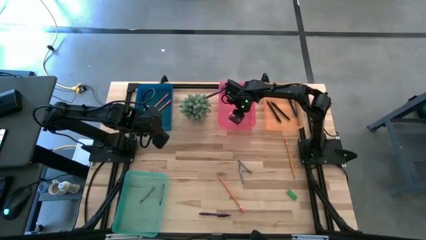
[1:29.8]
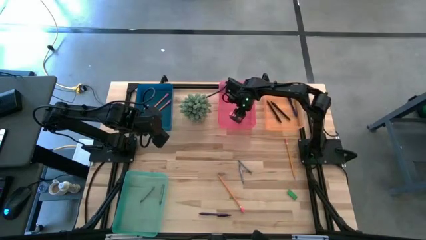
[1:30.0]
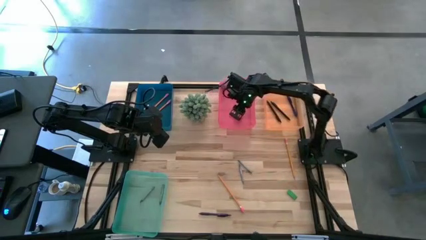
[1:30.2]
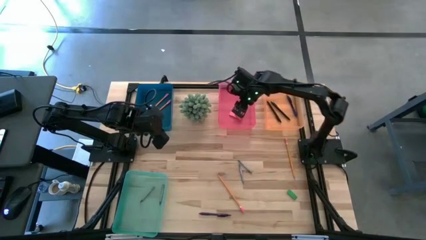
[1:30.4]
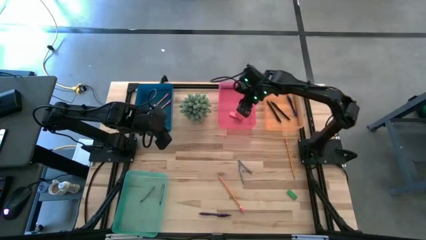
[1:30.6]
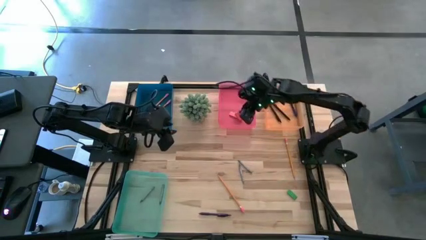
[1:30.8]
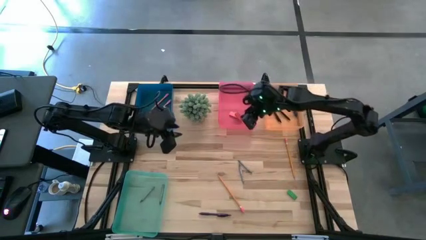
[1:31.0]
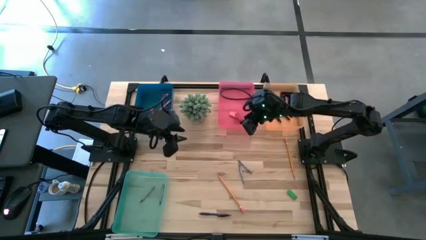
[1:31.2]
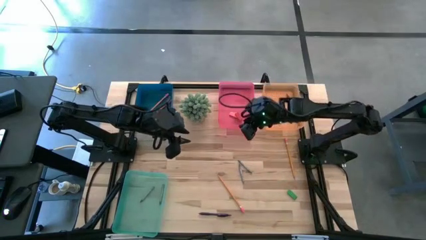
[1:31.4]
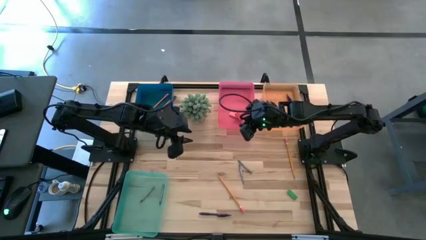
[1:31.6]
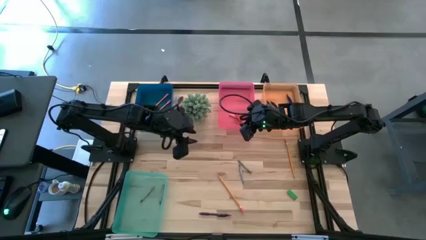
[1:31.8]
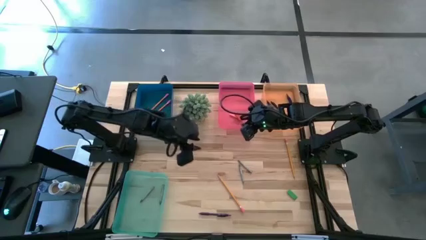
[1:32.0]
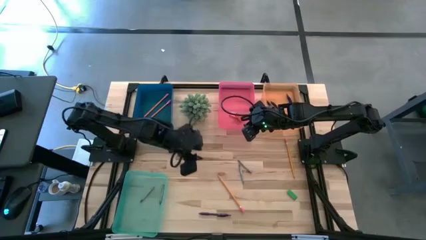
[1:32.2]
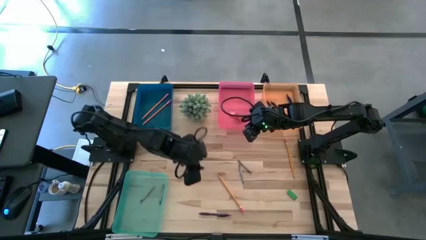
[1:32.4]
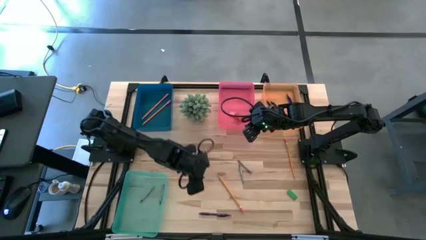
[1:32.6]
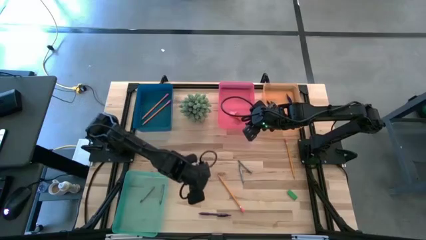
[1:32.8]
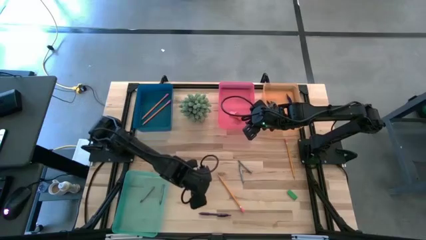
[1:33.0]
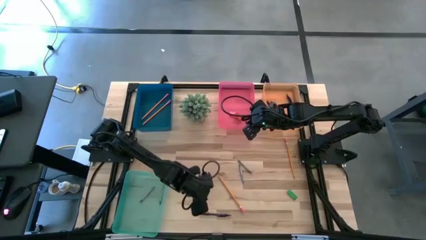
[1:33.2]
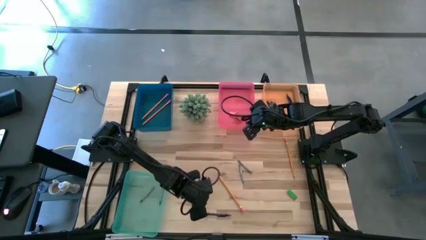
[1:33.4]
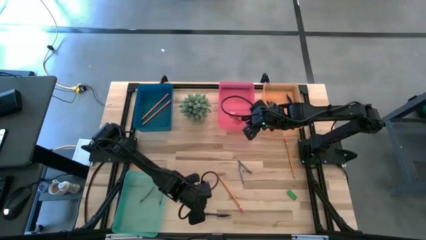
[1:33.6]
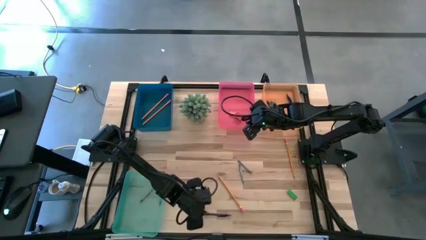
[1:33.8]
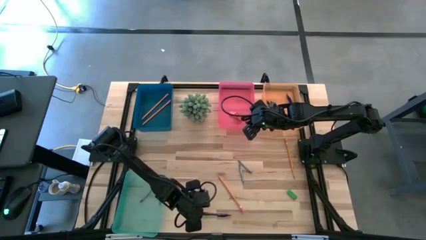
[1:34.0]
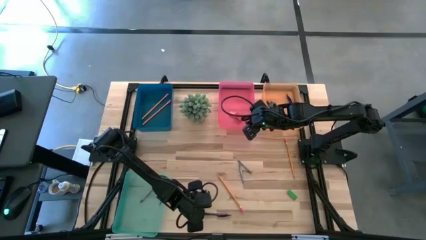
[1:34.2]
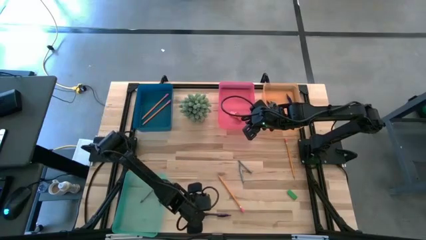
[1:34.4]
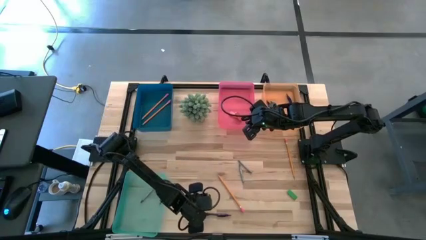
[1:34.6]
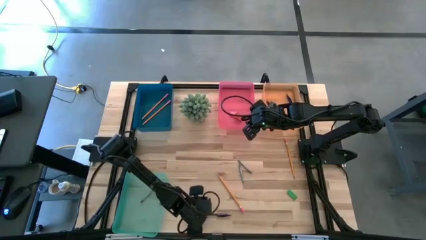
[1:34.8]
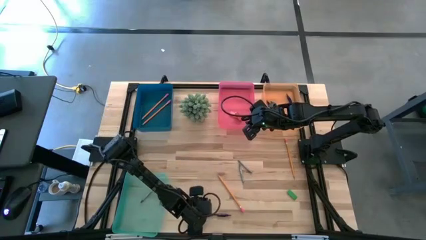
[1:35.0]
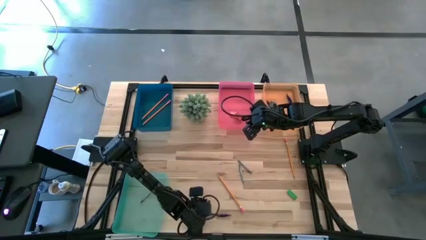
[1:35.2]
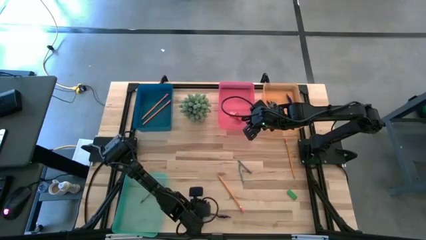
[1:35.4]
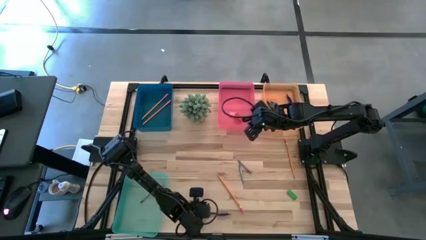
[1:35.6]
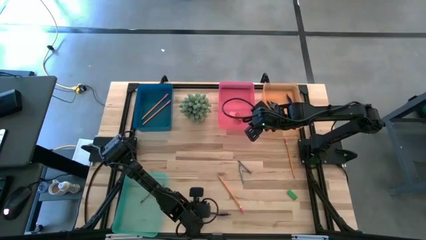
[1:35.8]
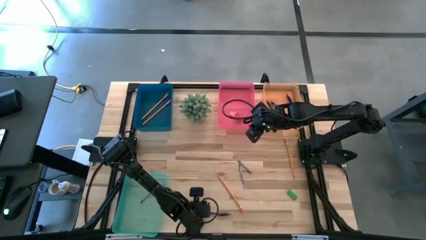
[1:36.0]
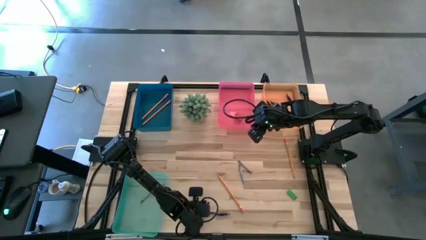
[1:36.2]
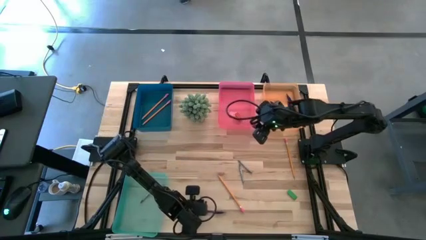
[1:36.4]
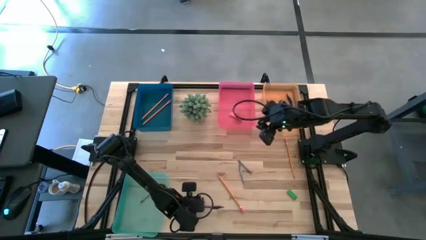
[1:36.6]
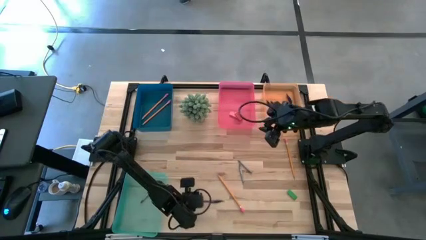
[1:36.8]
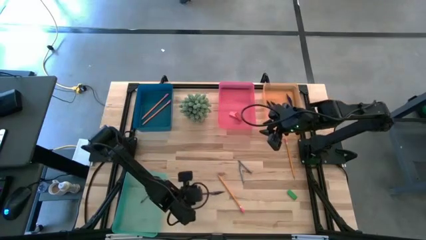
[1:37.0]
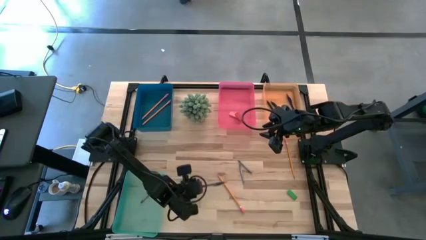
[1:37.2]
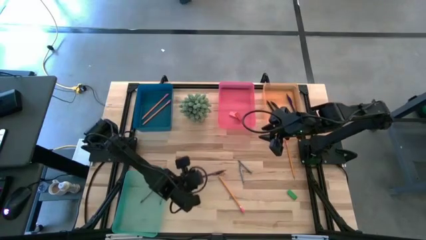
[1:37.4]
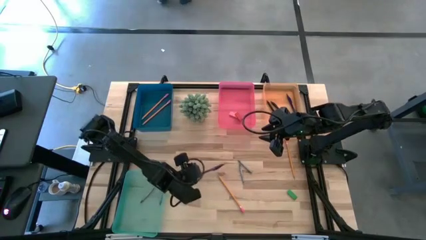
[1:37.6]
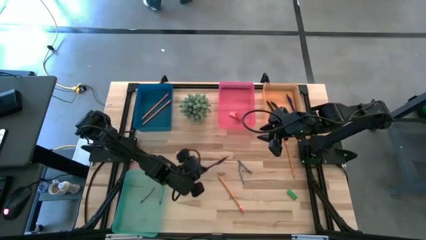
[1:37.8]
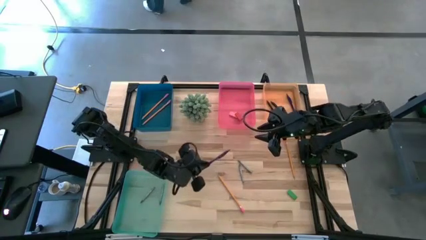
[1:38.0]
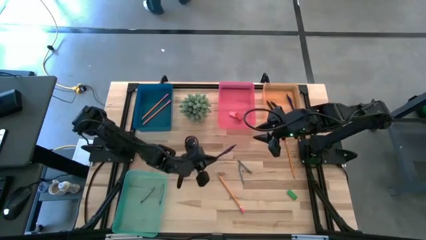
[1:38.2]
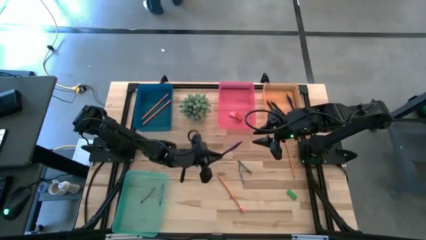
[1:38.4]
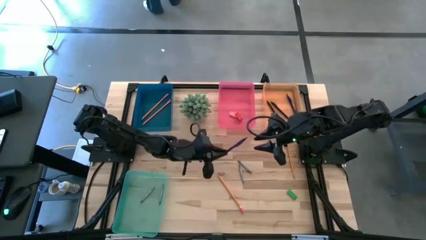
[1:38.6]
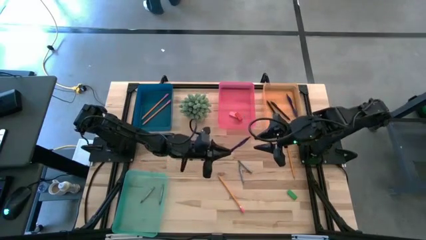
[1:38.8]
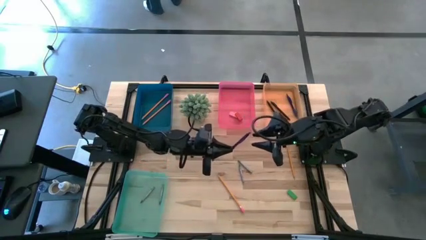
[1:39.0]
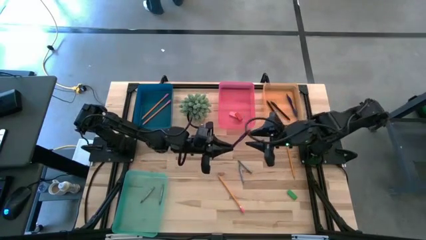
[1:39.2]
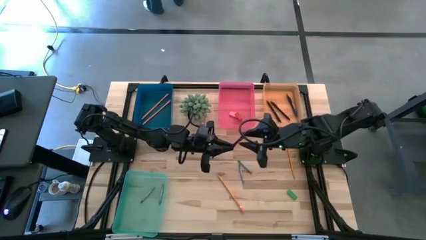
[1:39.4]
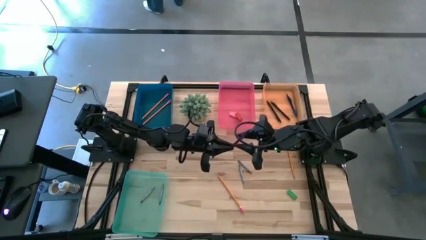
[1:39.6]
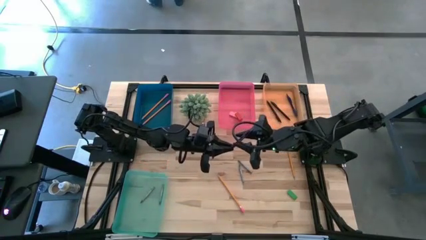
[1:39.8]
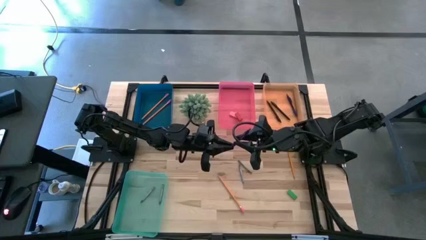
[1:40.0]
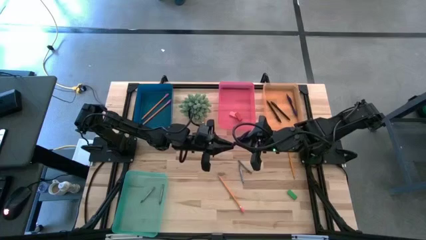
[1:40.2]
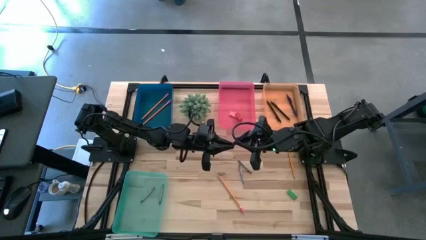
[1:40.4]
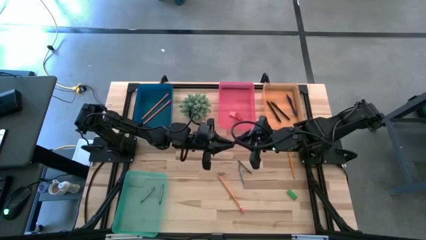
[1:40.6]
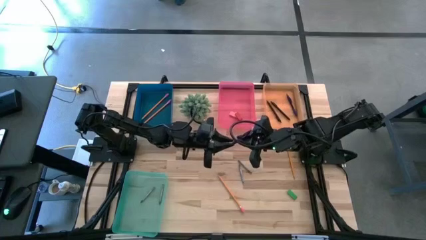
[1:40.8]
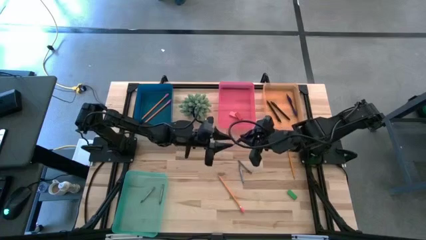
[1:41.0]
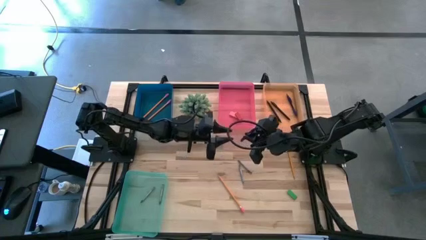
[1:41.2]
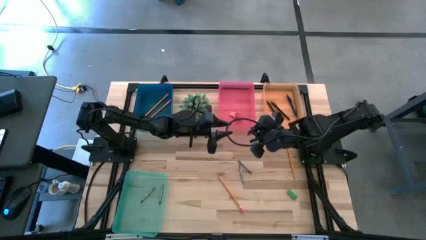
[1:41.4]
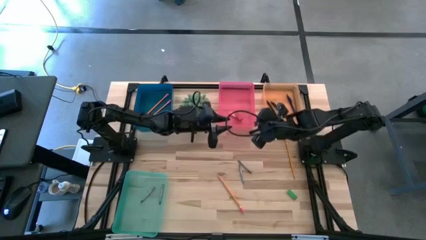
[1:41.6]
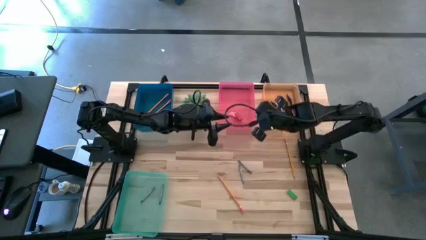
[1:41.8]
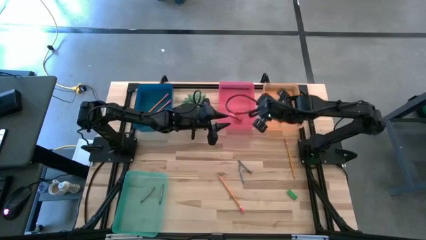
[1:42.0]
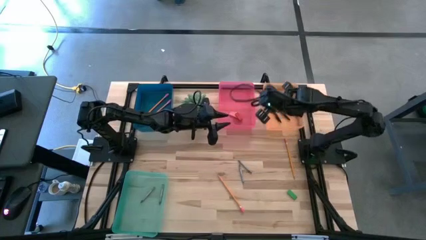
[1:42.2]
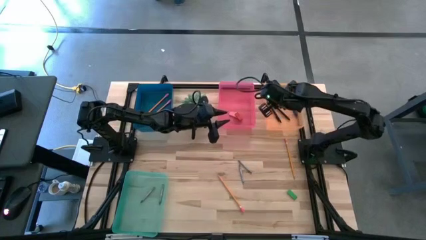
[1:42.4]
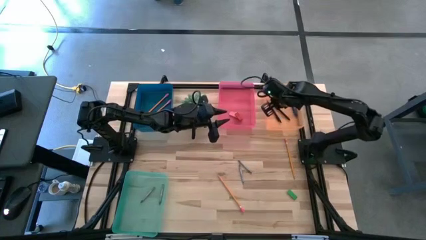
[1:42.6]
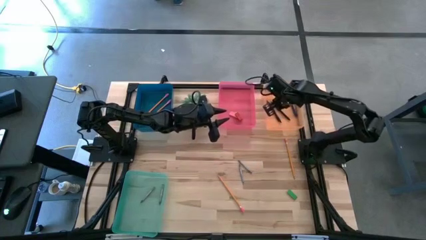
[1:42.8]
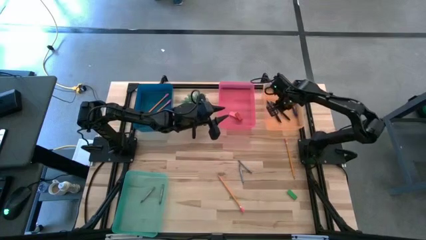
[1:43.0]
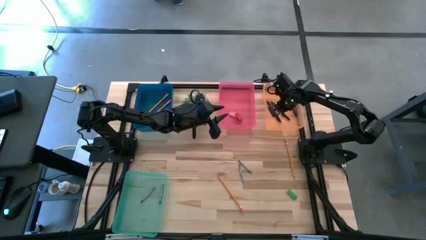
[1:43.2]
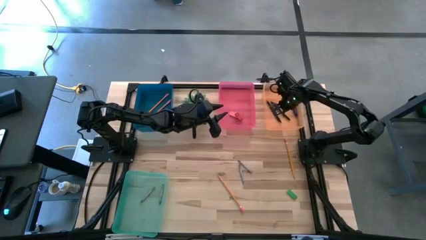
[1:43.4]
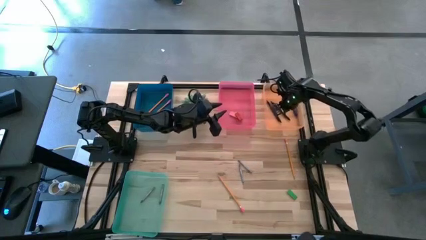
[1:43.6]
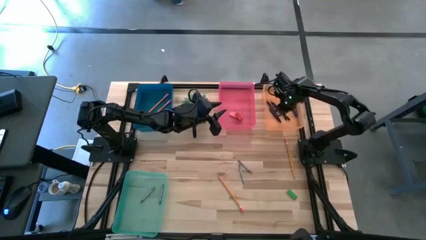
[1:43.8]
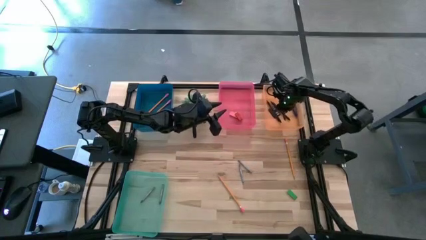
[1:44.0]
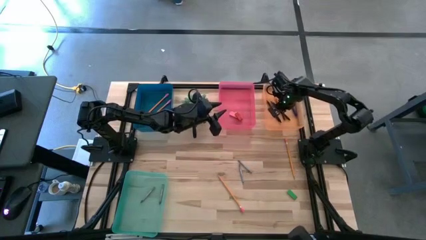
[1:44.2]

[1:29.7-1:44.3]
Task: Sort crayons/erasers/pens/pencils in bins
Put the purple pen into the orange bin
